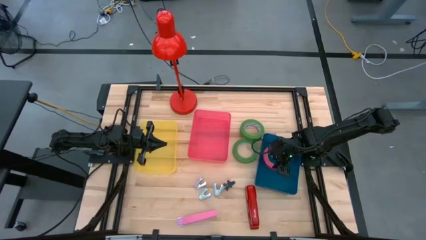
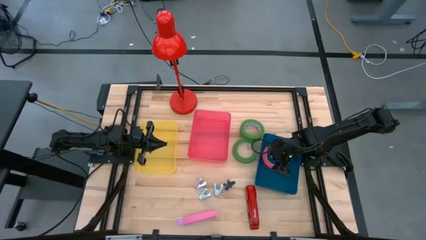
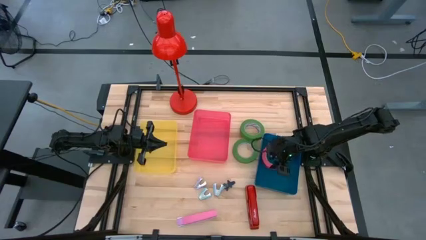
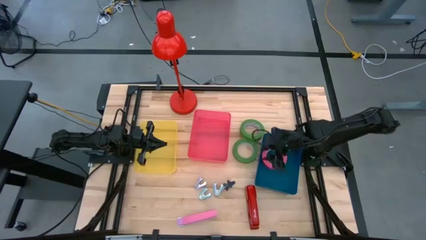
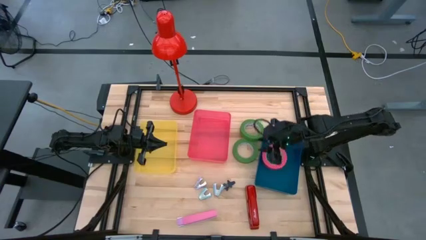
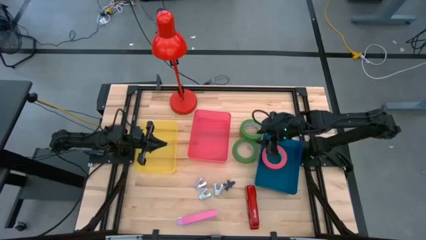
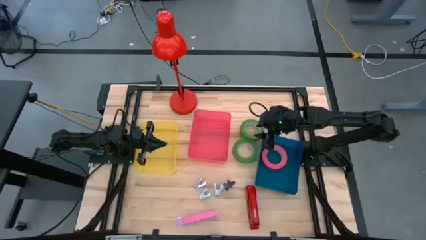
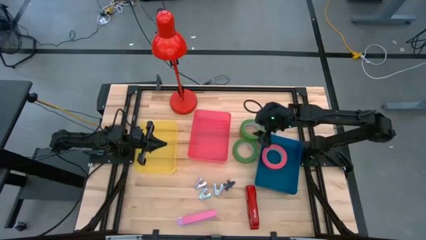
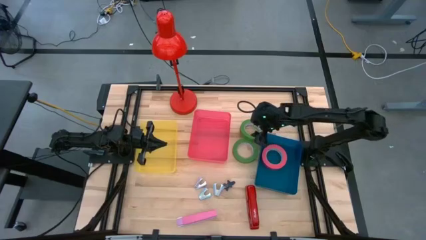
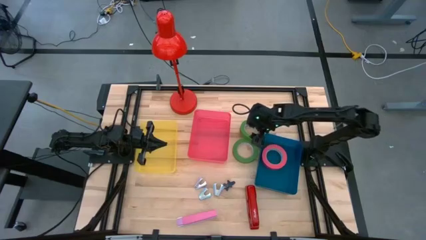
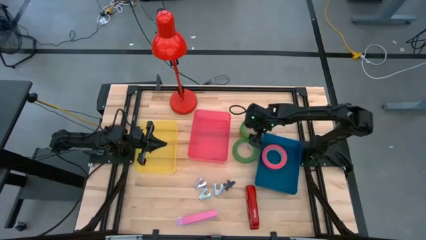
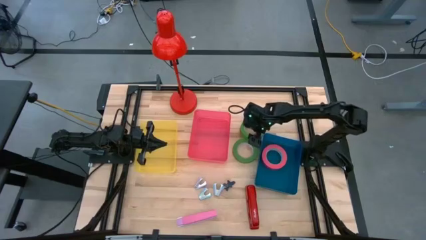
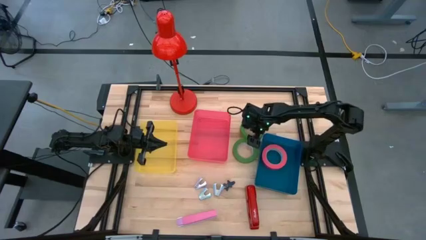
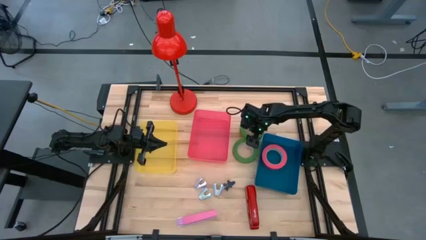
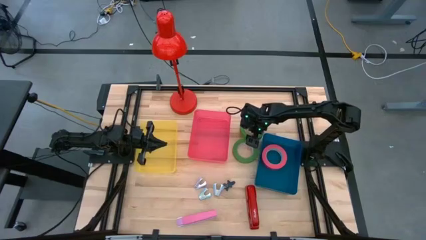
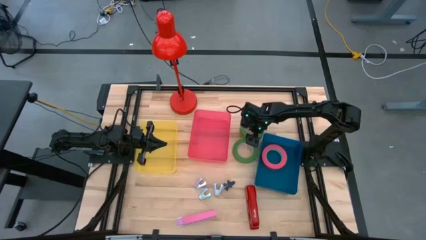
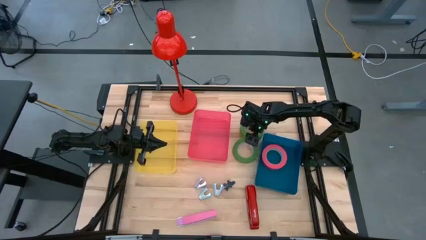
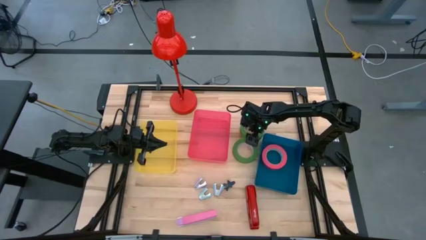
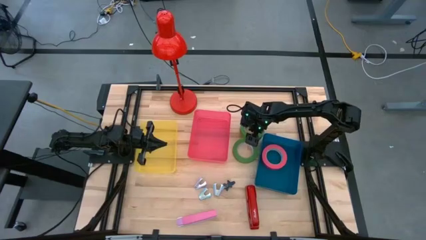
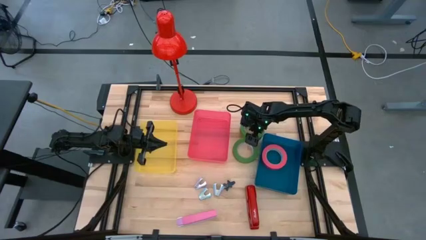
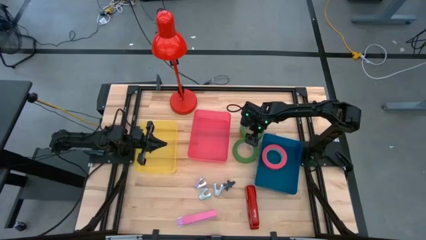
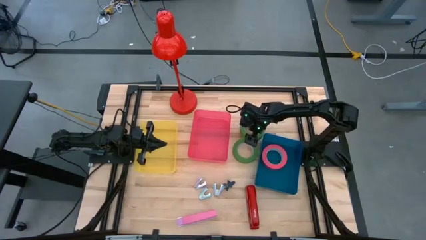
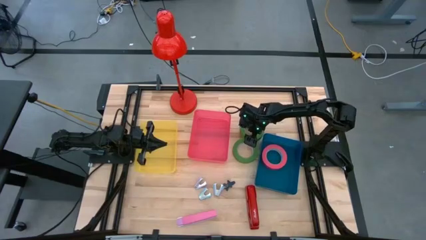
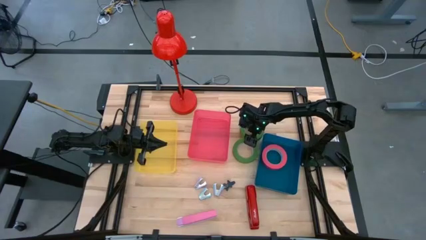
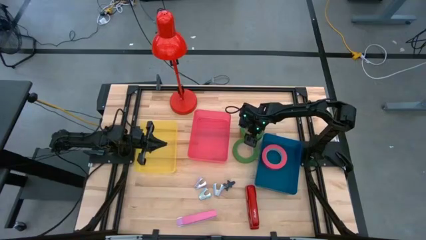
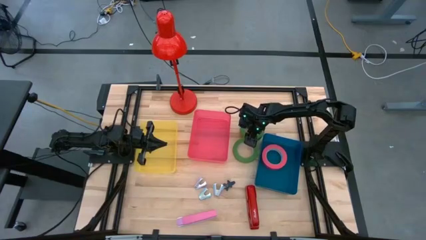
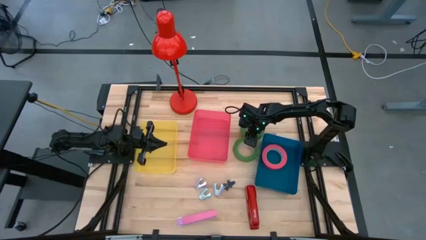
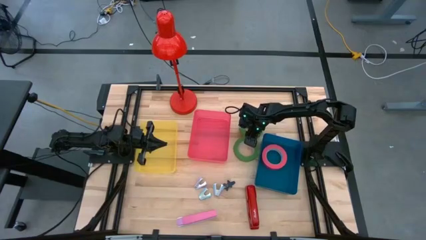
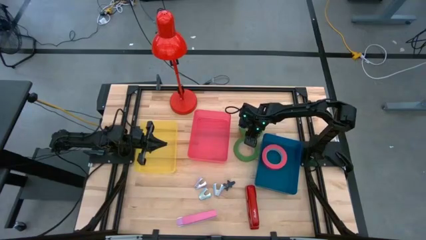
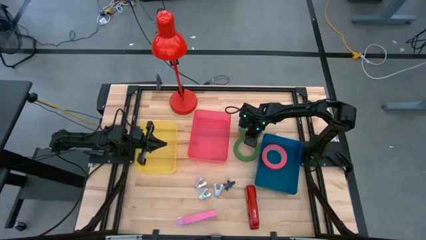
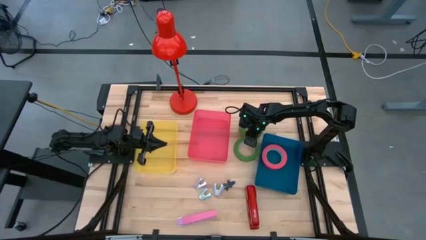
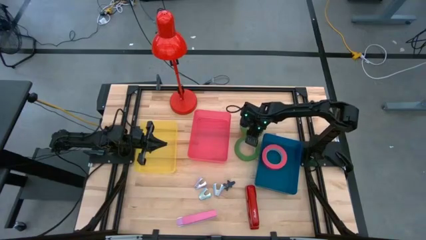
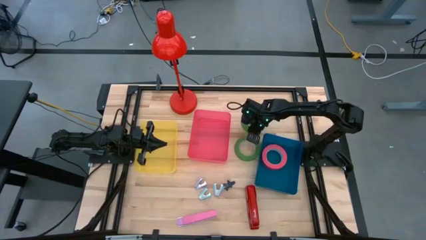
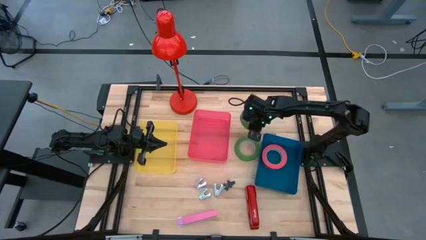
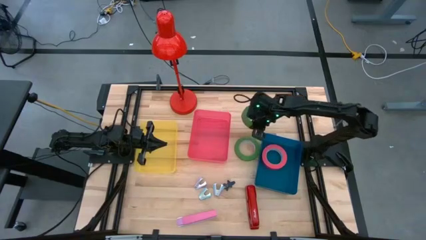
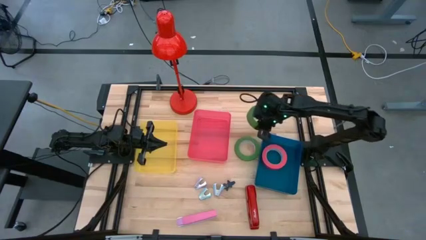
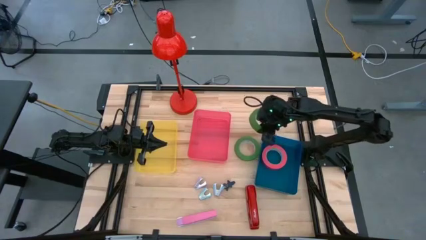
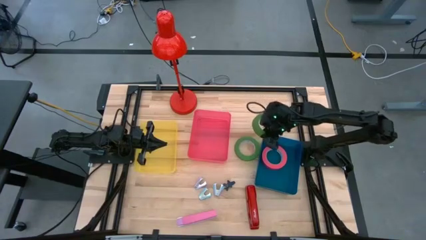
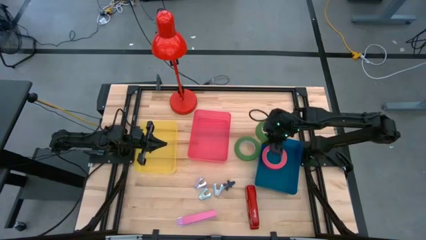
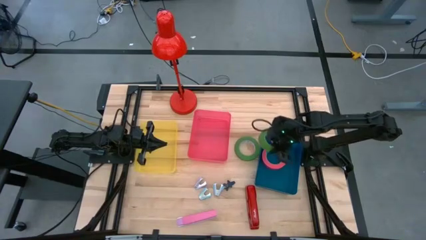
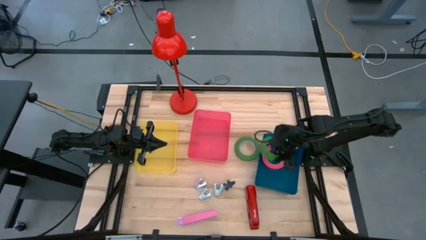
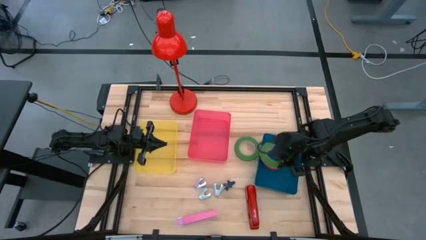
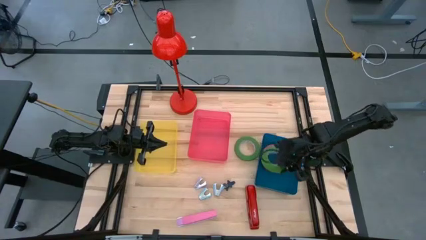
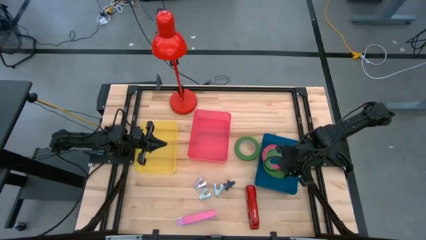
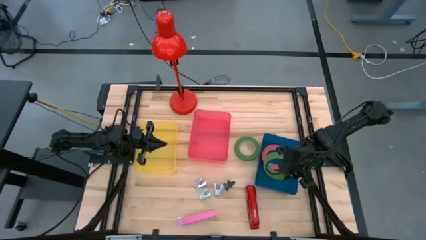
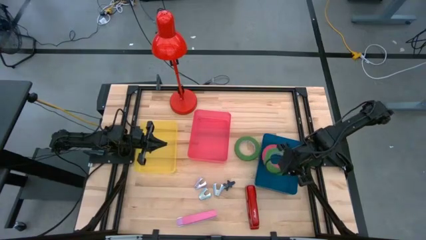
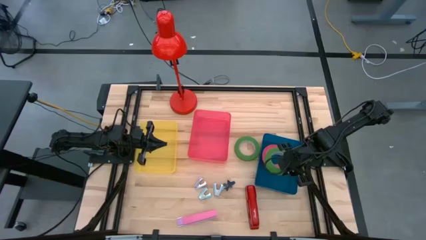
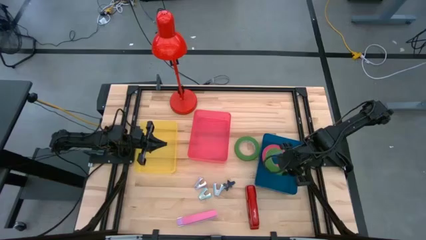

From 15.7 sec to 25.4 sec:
Task: Pick and place Stapler, Stapler remover, tape
Put the top green tape into the blue bin

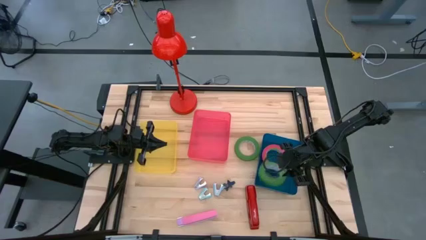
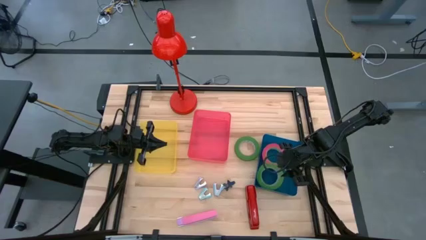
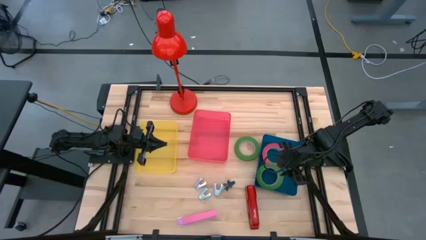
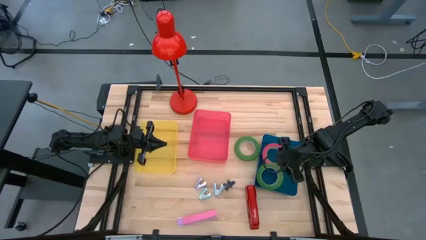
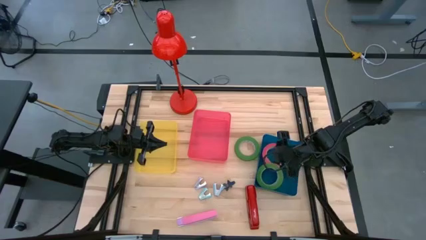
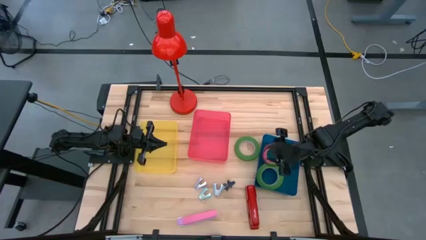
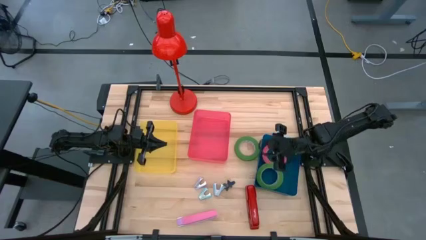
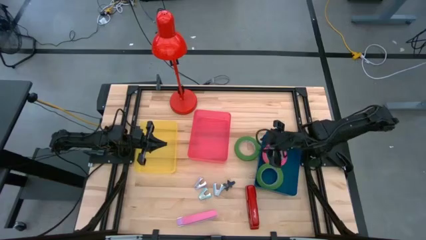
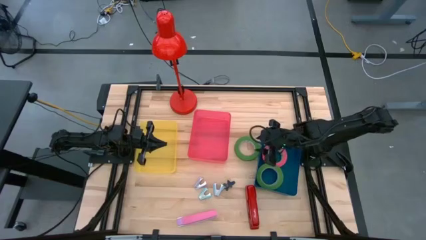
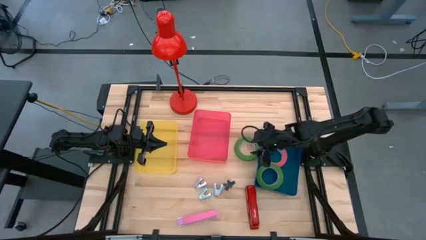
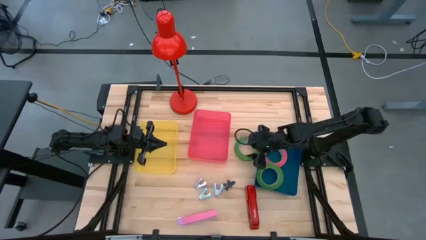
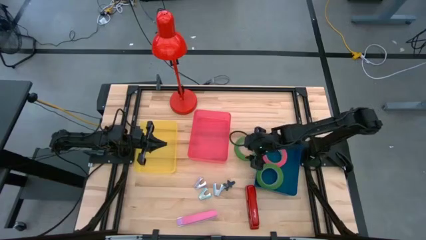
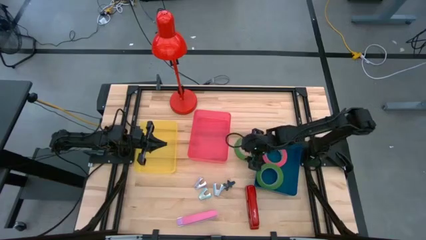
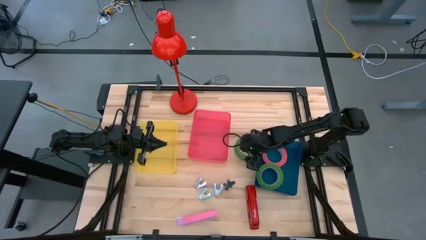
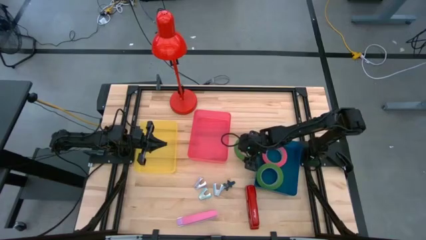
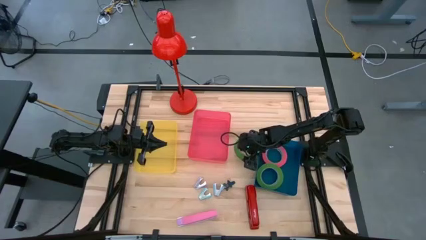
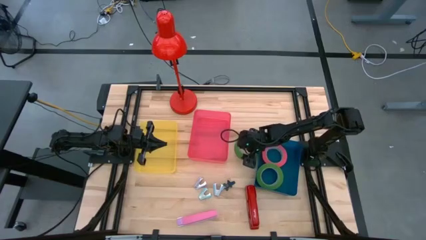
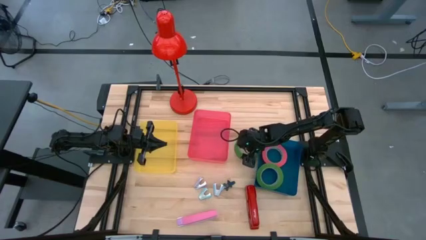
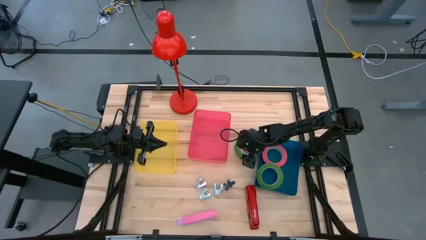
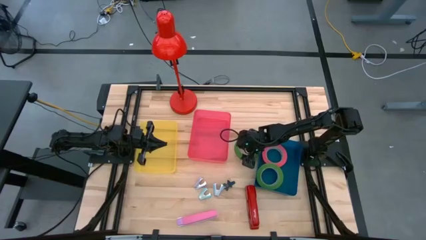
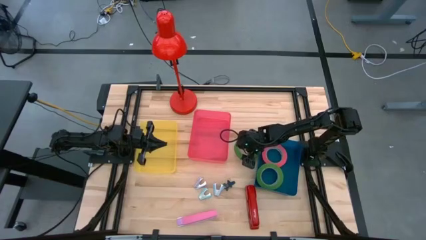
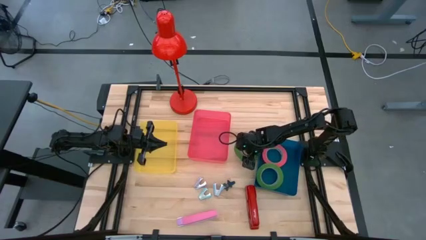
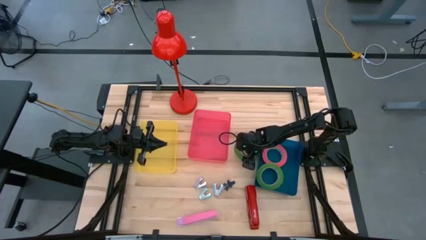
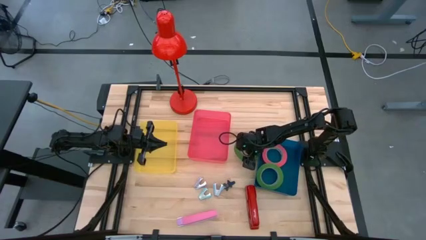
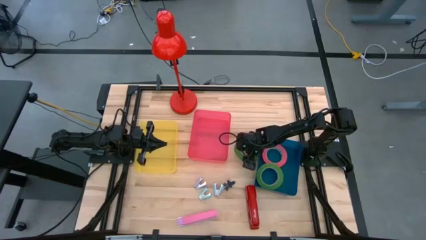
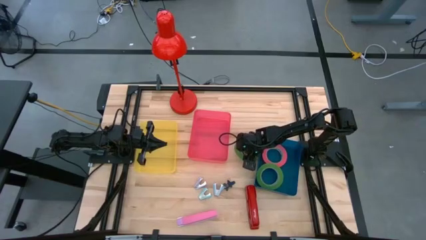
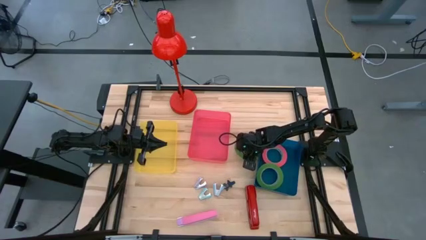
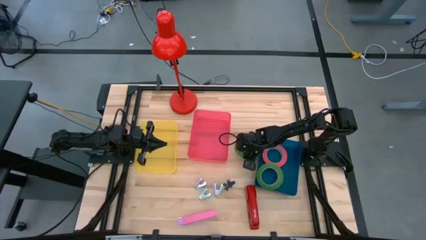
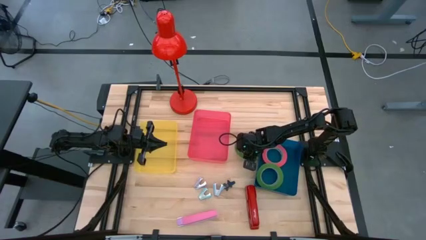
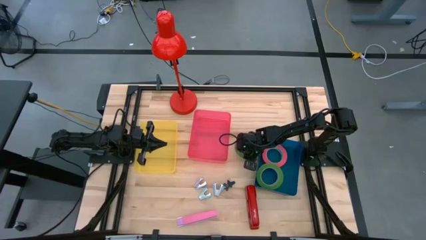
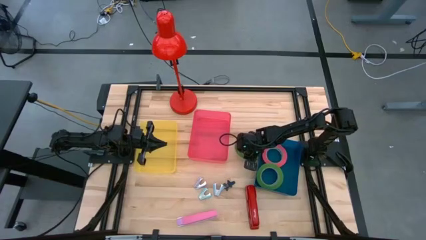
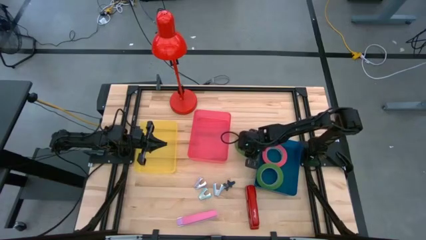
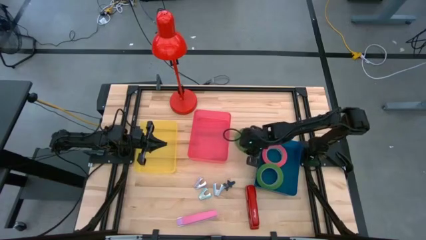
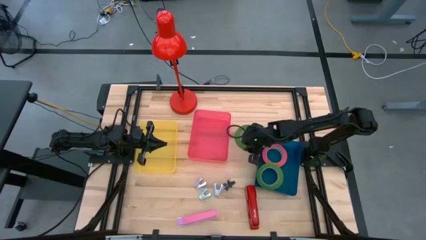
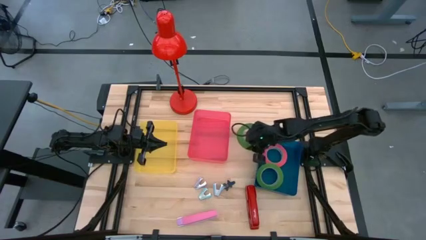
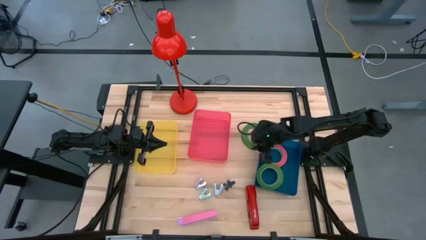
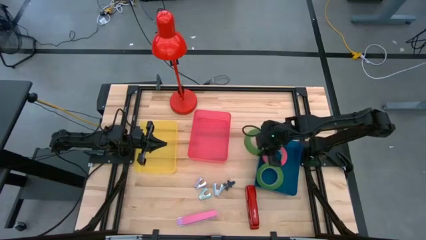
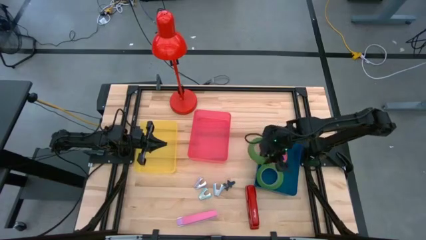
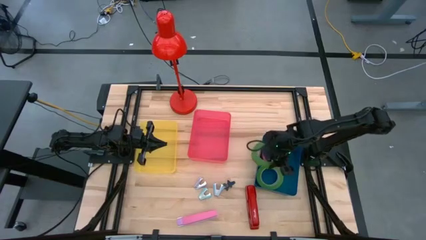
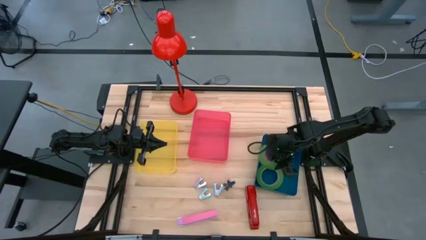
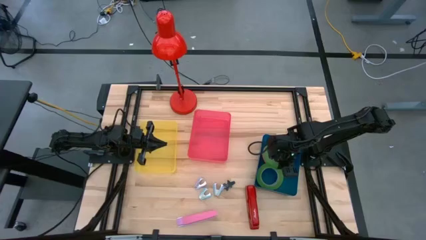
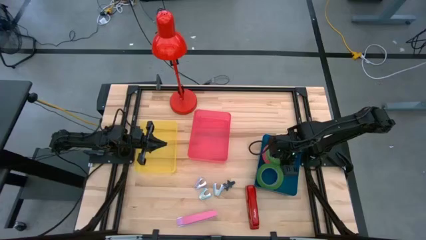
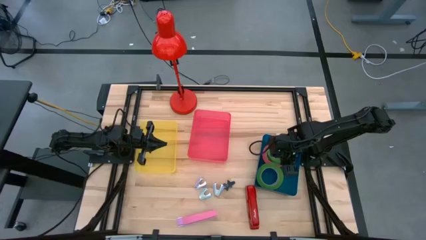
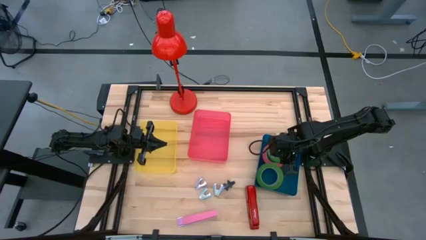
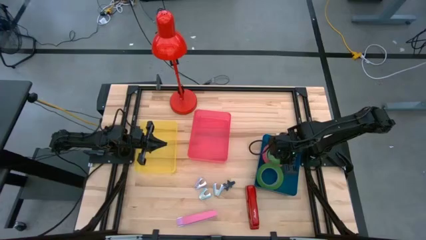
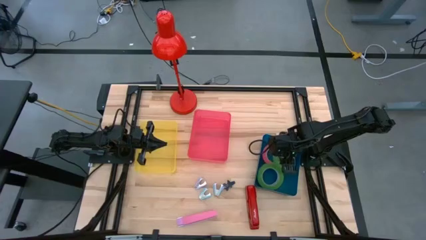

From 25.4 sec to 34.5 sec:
Put the green tape into the blue bin
